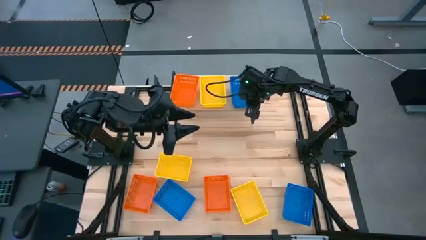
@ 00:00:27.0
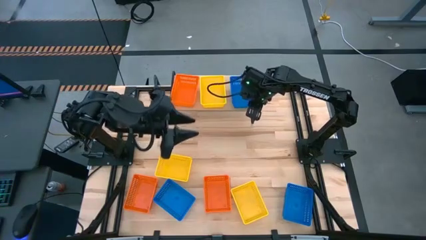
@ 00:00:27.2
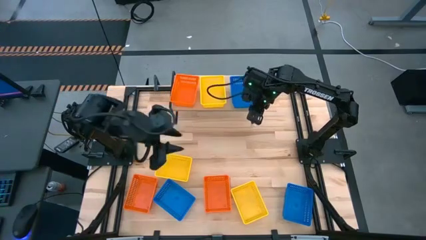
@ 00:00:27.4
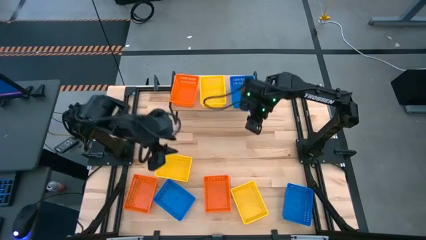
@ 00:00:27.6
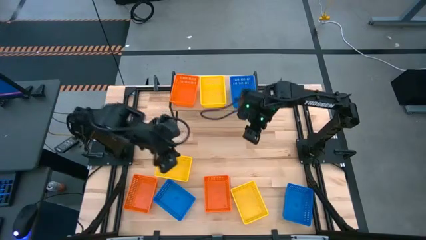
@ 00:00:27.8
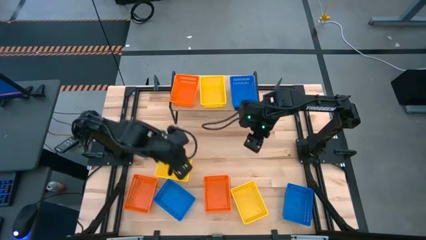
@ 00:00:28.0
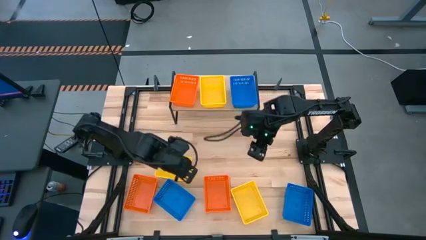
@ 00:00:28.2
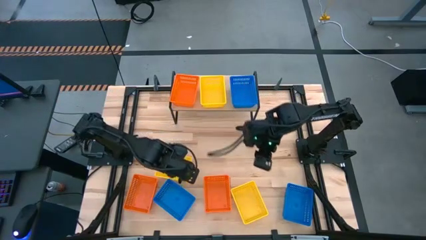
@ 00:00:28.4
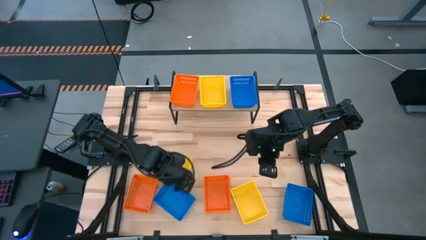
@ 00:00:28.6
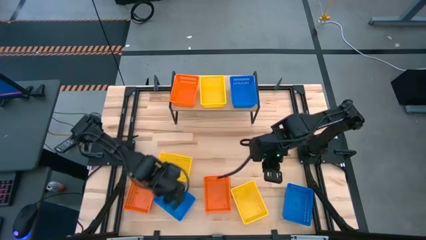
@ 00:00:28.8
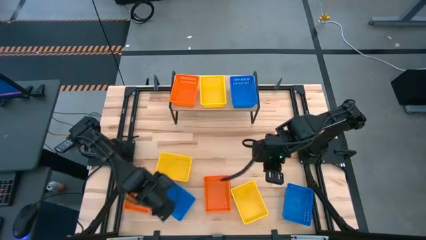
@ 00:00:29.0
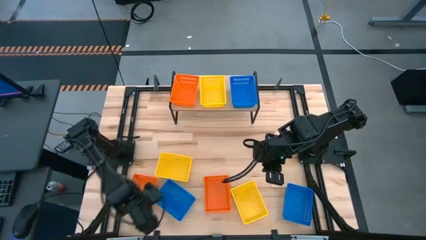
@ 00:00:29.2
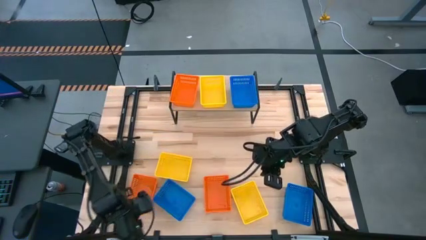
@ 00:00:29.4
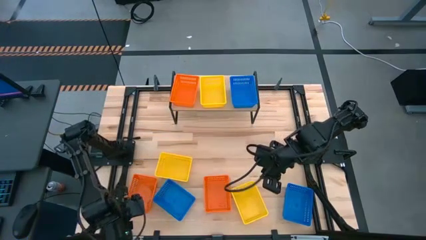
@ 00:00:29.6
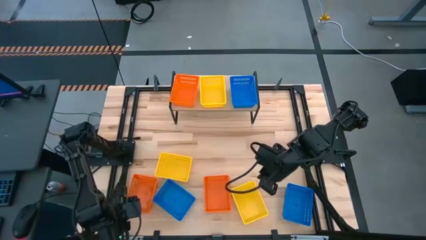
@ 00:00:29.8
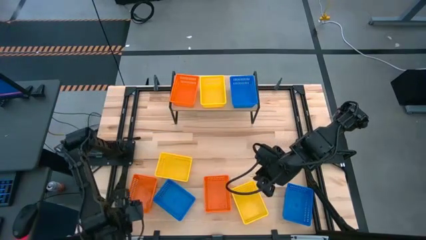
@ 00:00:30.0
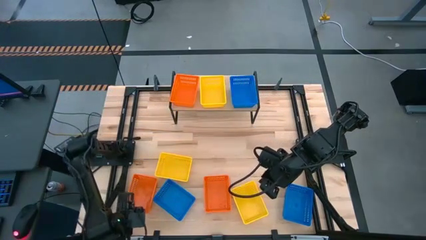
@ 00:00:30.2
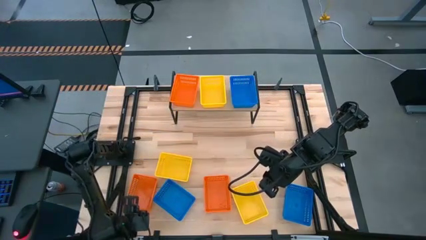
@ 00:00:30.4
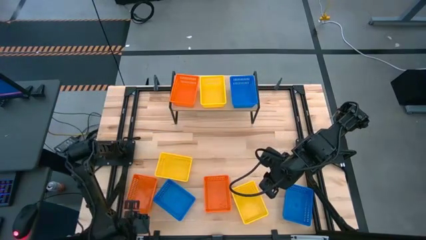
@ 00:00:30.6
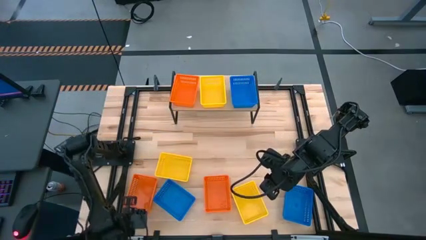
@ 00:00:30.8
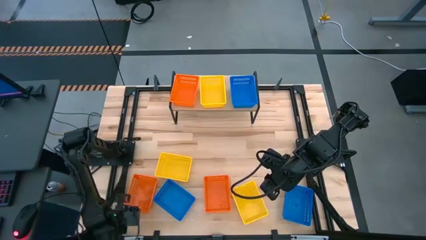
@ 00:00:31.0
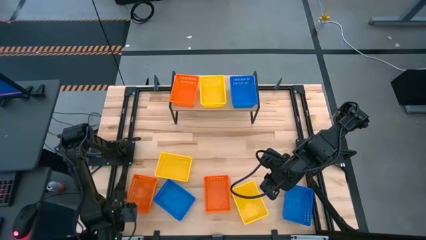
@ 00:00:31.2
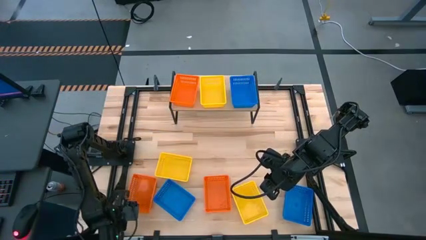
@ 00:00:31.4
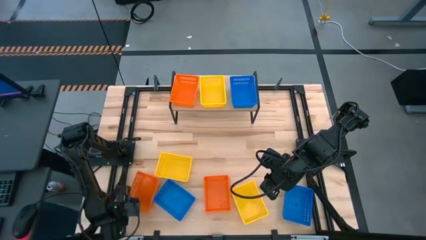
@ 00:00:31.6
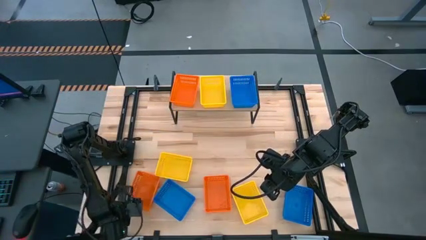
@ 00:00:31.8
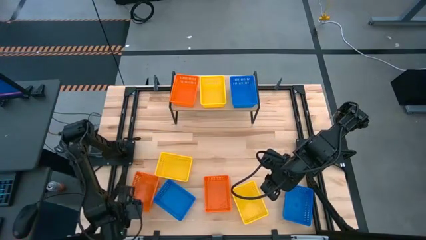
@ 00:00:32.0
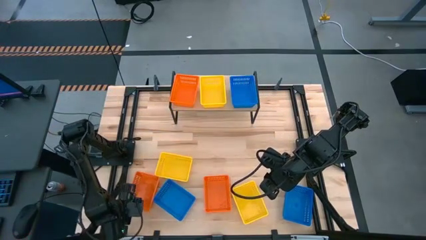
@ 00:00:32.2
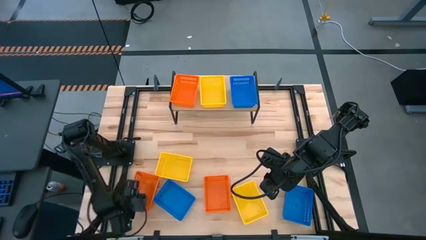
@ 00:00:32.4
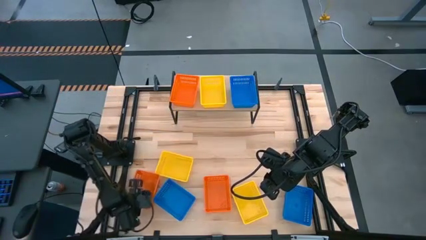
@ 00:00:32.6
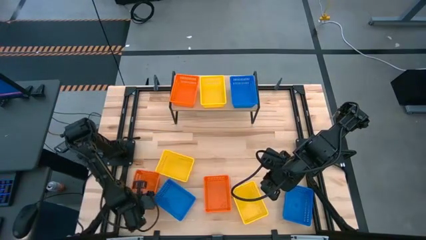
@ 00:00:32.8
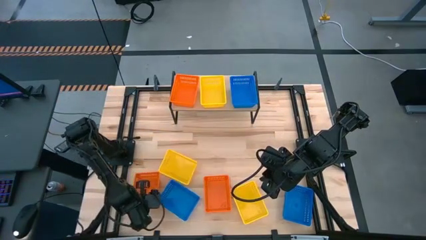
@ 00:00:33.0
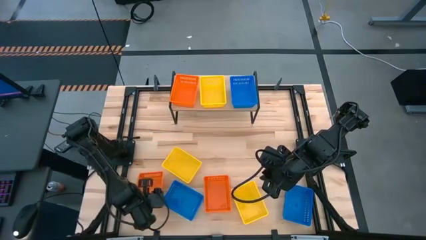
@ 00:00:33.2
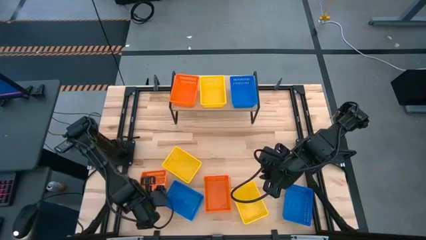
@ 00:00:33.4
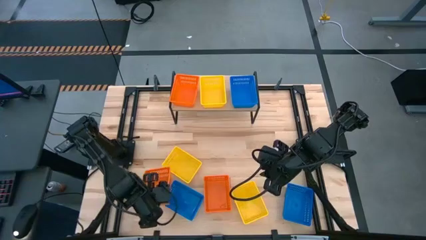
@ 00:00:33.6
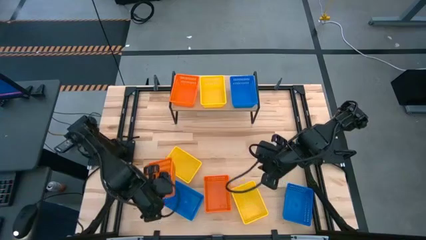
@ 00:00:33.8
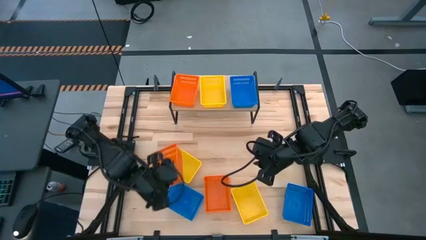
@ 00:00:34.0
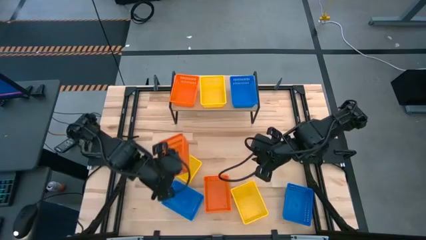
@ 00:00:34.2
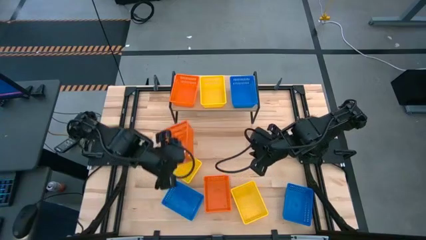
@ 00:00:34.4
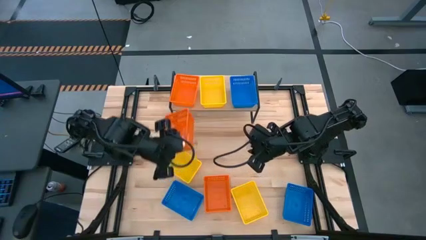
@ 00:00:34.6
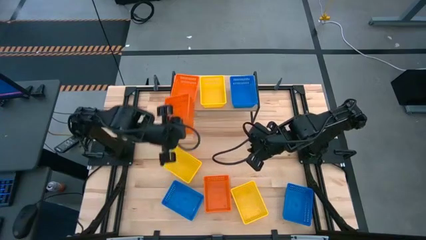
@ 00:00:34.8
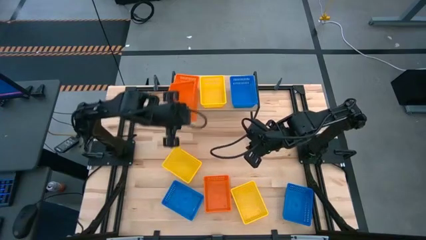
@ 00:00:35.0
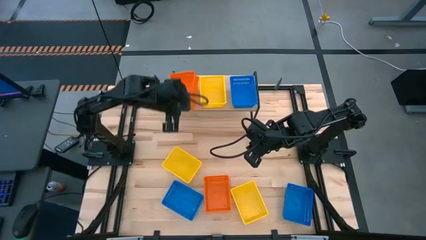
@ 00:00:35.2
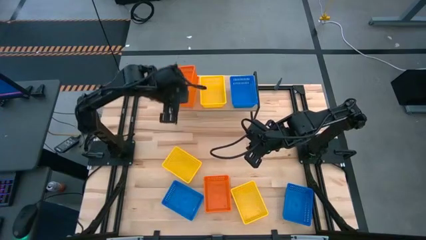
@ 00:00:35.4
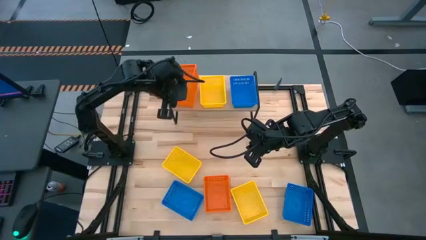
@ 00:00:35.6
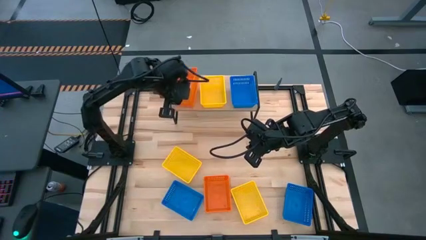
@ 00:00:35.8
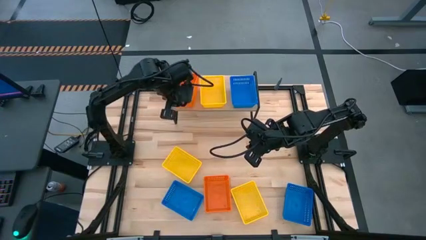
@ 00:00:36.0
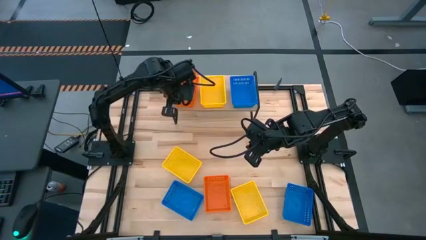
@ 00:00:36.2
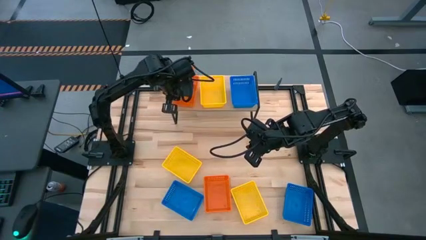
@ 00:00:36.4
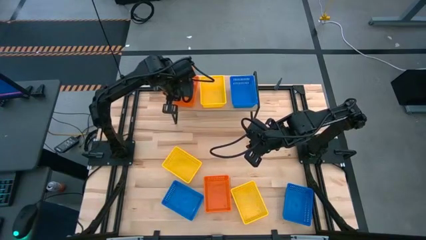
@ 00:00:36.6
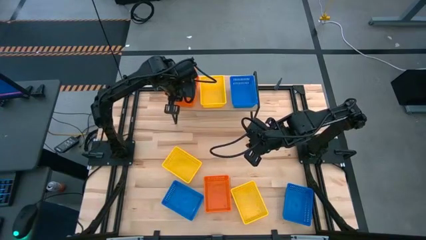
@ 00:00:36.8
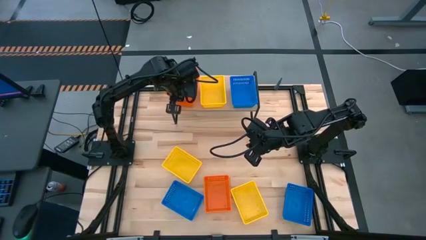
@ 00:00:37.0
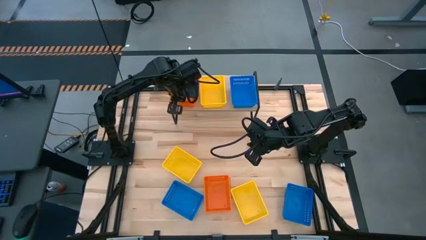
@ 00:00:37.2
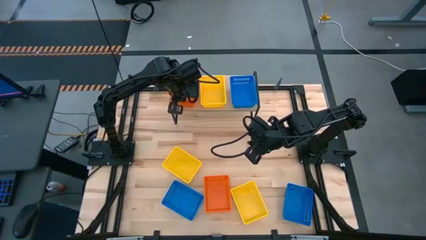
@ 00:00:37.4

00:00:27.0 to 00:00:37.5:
Task: Stack baskets on shelf by color
Stack the left orange bin on top of the orange bin on the shelf
